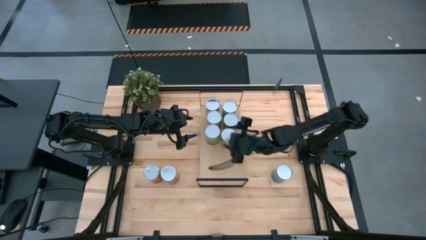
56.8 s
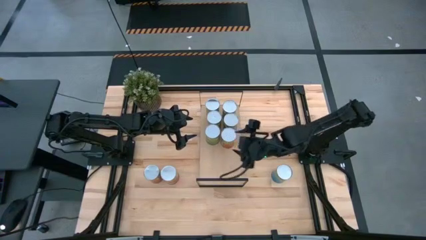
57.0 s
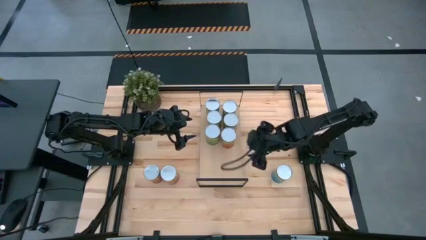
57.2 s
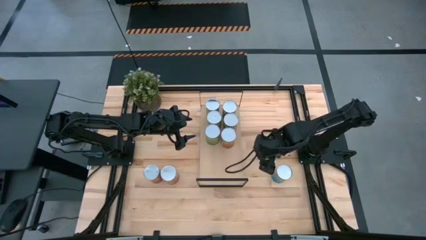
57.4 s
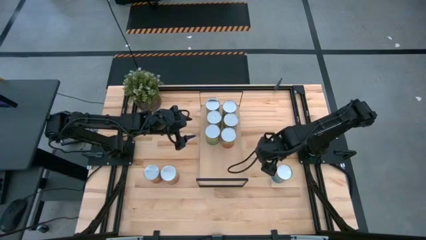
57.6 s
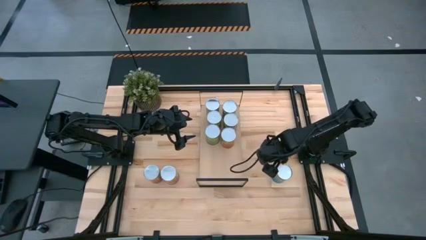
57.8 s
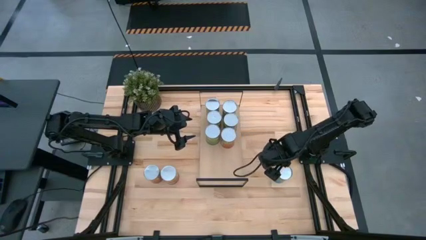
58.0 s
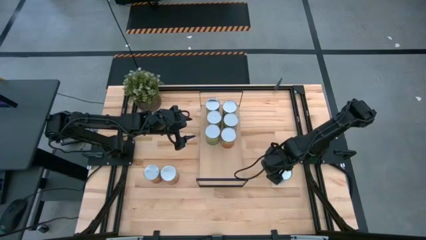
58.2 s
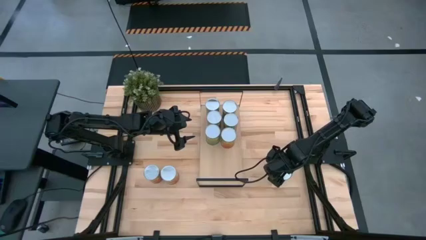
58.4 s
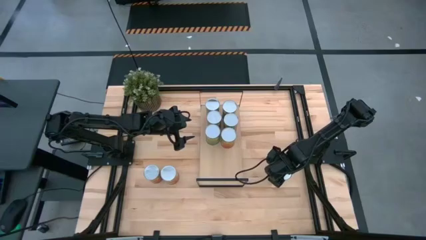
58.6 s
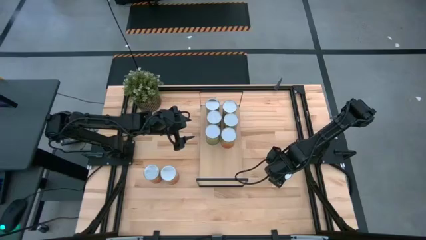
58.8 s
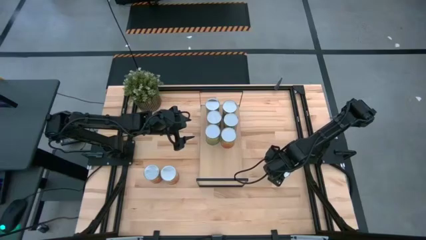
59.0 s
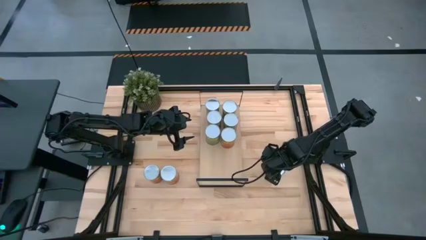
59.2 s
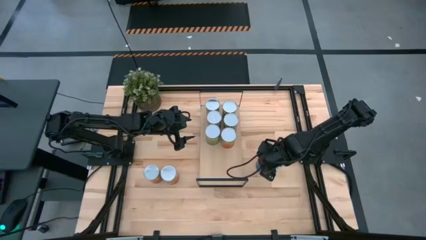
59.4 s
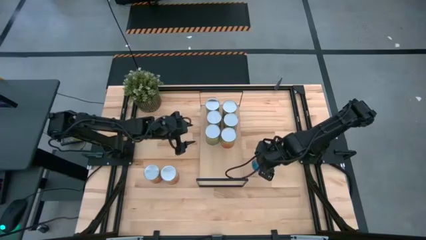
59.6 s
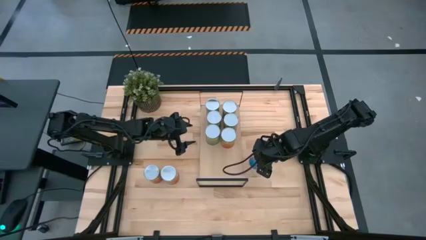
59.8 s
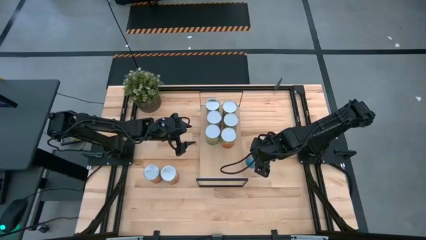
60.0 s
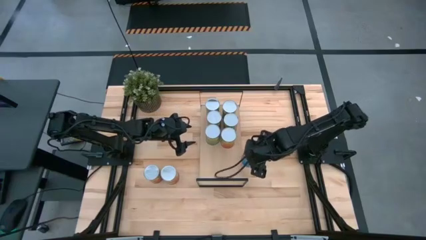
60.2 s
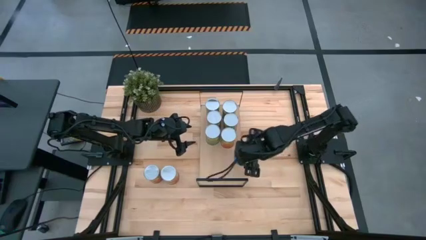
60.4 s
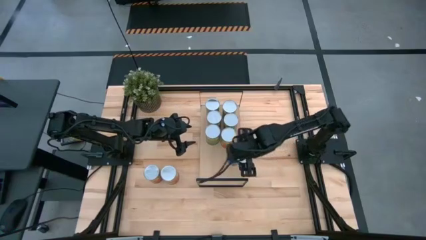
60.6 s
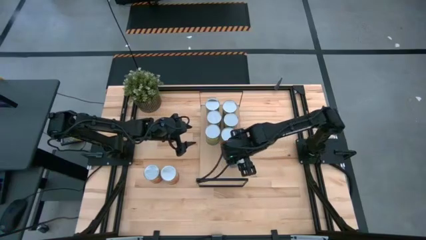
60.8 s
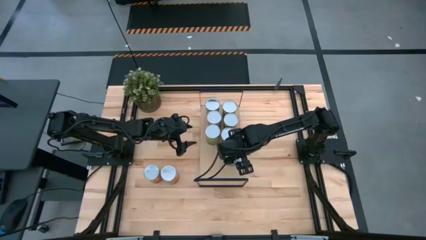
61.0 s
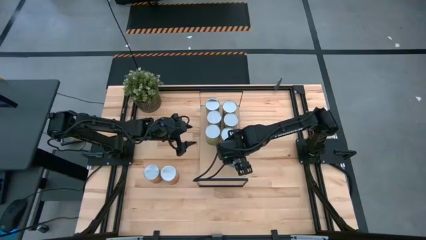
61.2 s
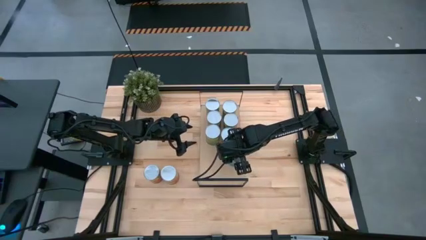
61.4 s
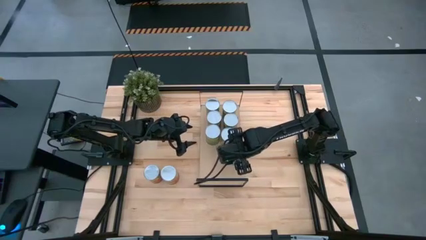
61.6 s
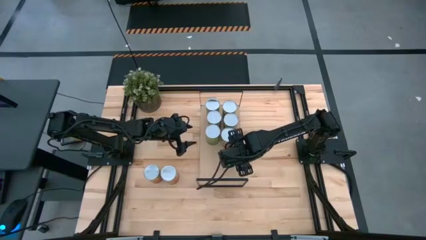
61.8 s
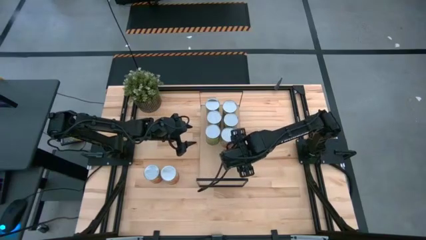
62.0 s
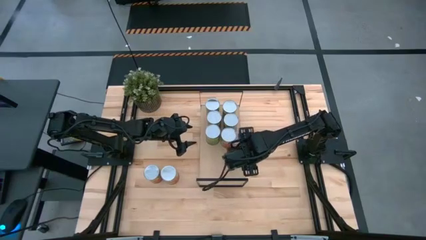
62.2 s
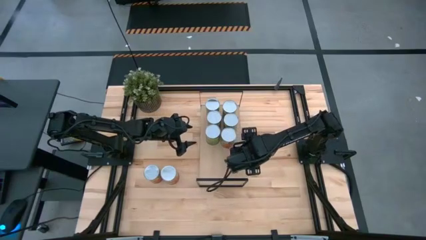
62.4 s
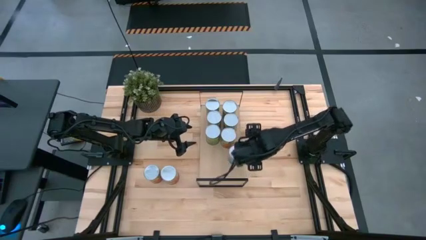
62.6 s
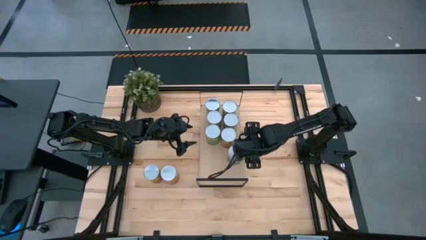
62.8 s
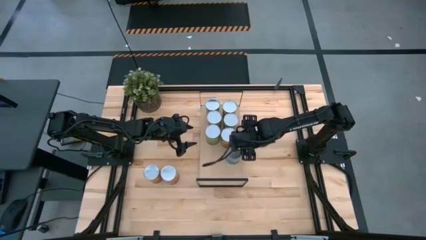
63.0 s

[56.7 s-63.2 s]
Task: Pick and place cans onto a shelf
Put the canned cherries on the shelf

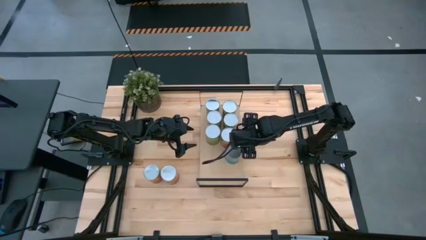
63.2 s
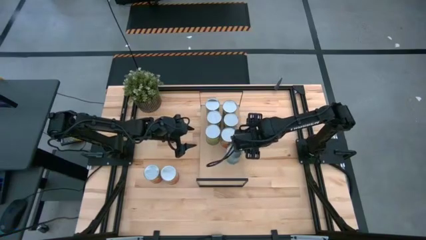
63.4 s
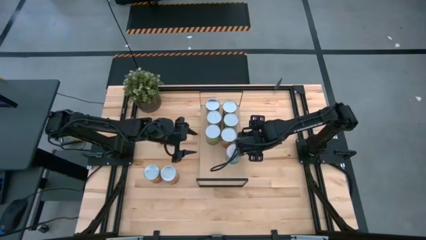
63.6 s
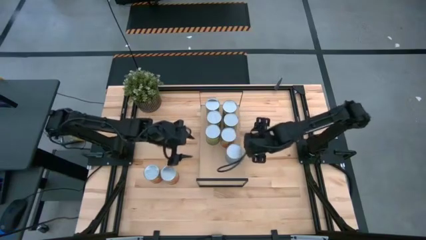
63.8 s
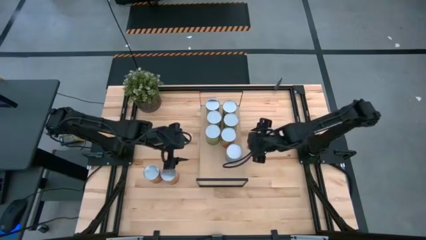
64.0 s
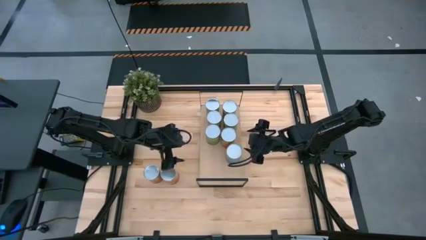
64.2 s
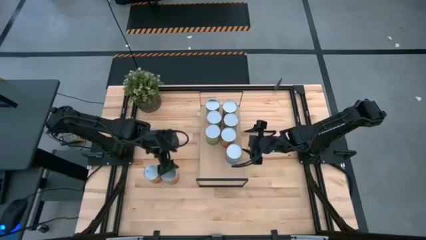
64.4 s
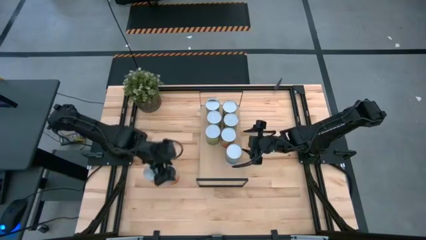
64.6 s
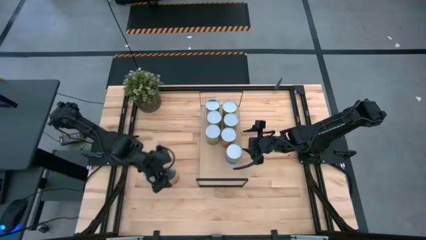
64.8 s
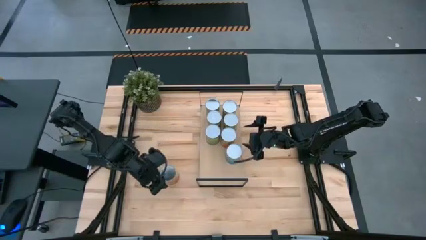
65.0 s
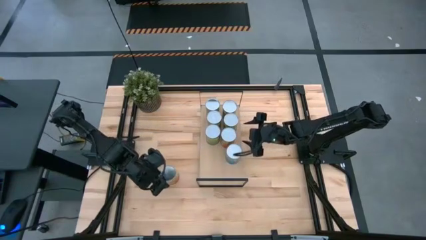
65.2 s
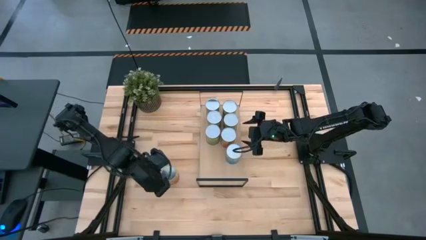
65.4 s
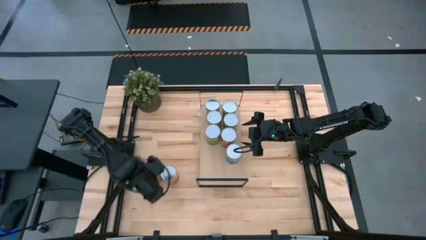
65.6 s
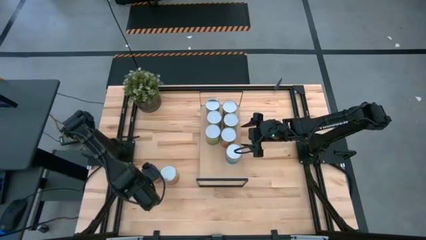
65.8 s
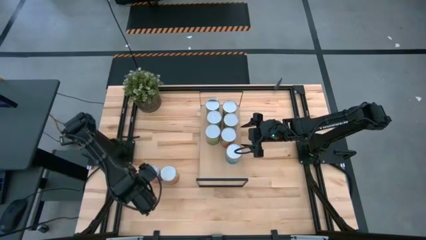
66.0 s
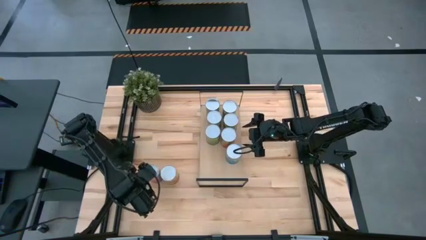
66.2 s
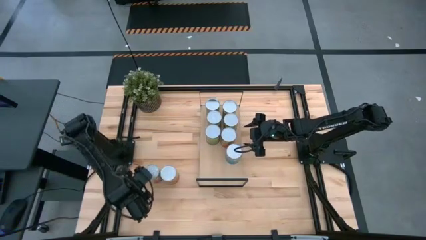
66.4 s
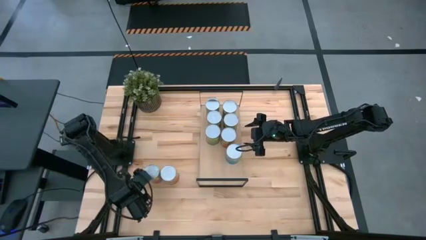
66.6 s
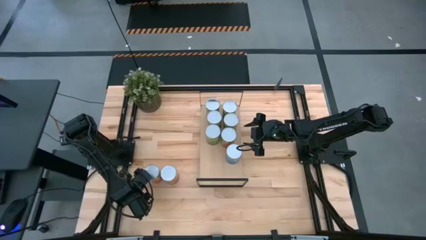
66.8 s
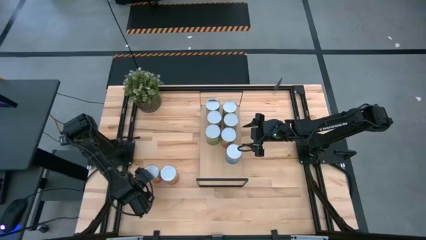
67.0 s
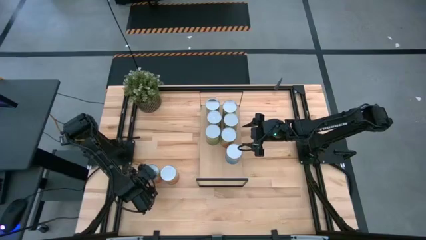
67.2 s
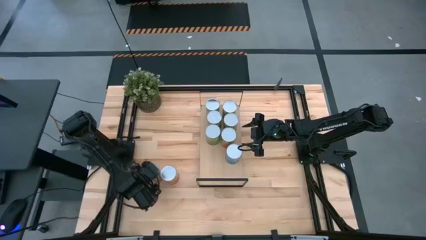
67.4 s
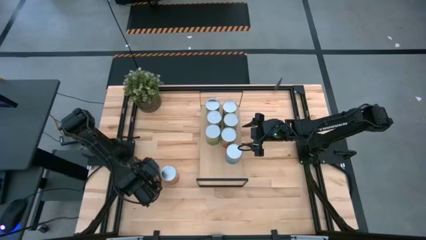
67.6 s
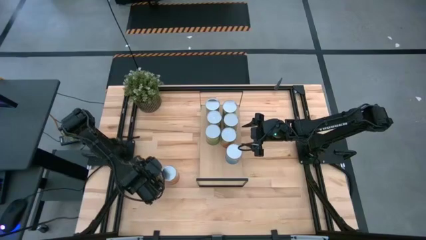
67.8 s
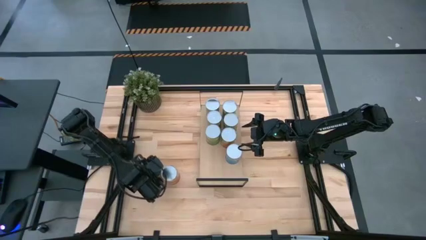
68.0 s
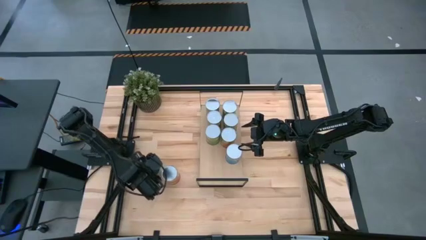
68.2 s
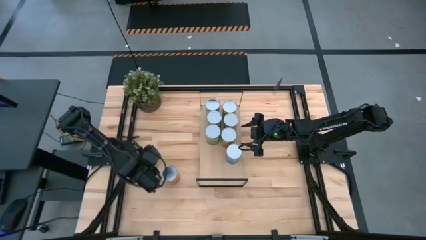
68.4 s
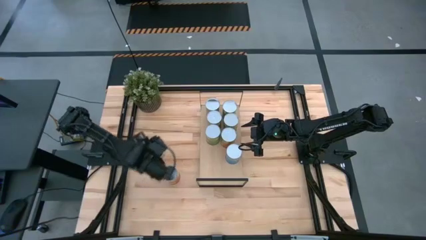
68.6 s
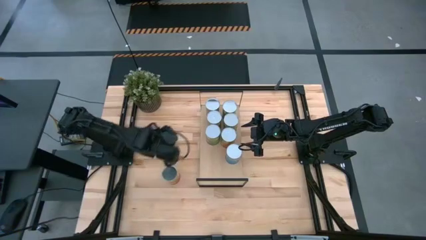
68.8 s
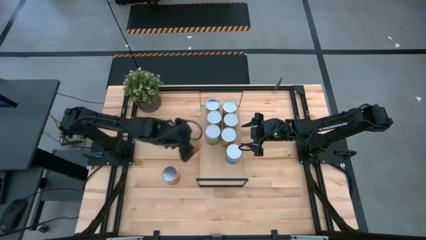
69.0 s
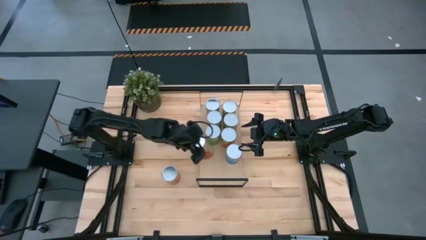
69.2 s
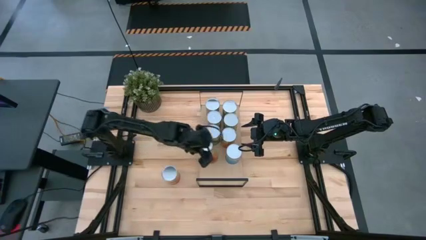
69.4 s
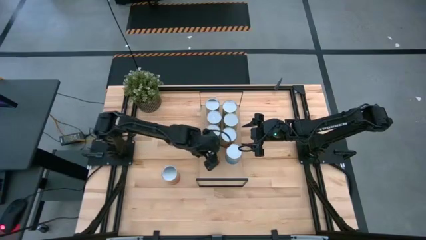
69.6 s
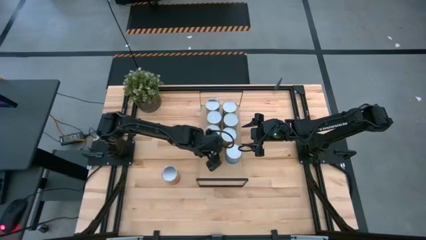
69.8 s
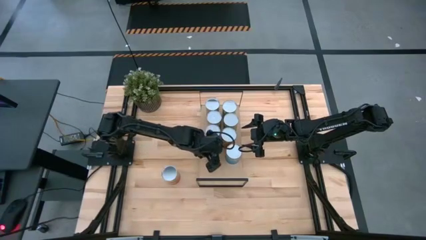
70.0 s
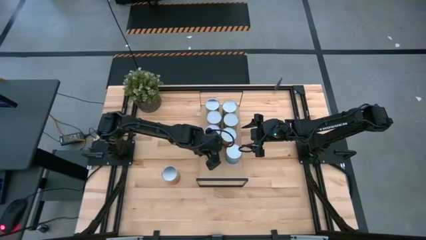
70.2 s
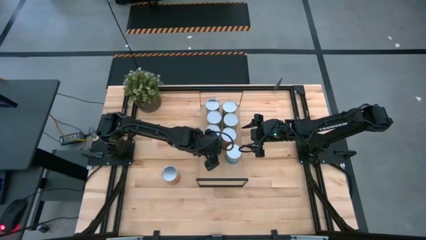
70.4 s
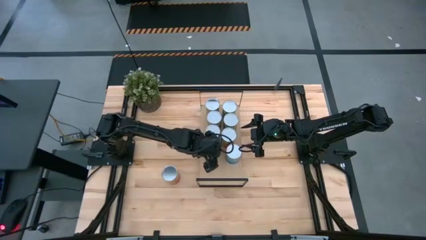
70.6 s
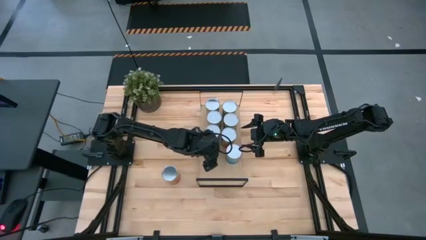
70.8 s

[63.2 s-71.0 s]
Put the canned pineapple on the shelf

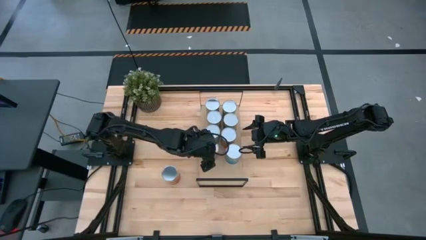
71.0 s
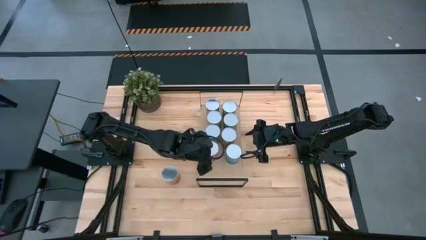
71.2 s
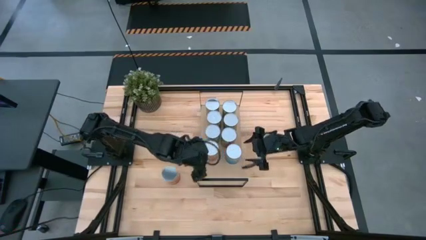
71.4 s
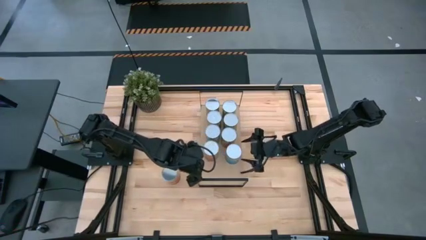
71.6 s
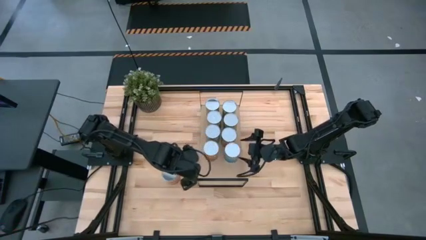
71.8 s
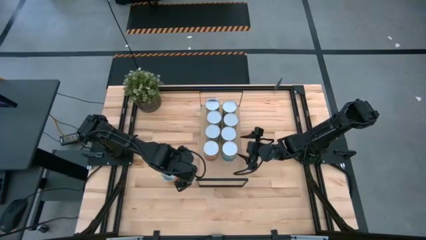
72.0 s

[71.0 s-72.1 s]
Adjust the canned cherries on the shelf

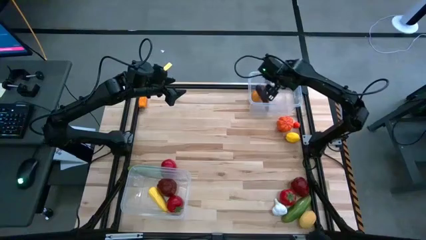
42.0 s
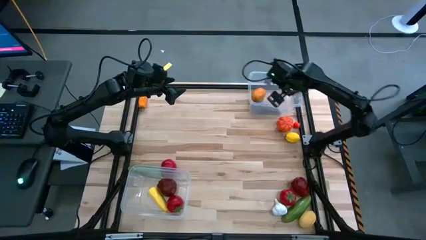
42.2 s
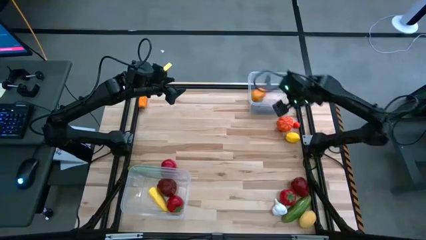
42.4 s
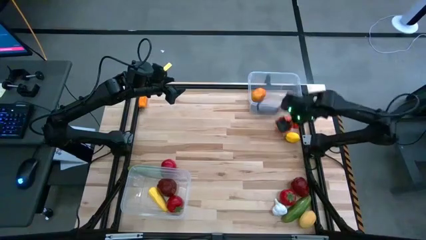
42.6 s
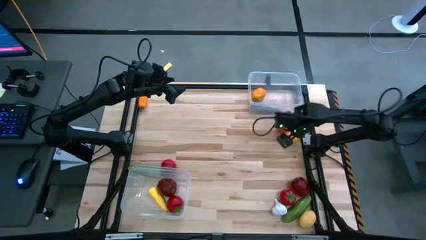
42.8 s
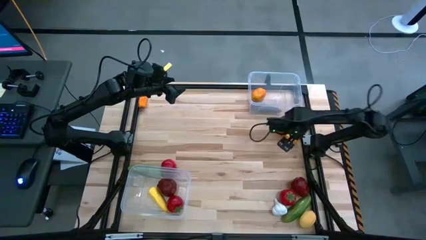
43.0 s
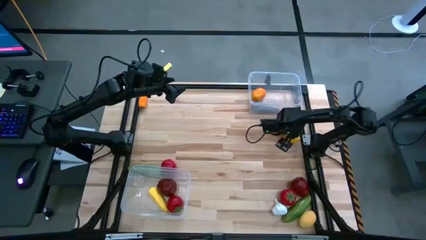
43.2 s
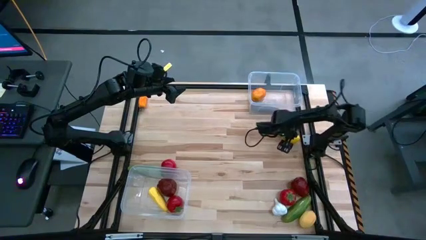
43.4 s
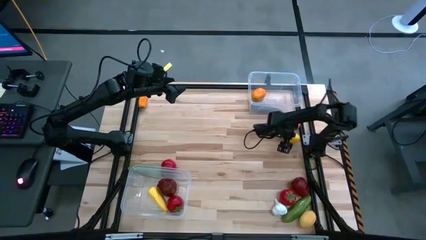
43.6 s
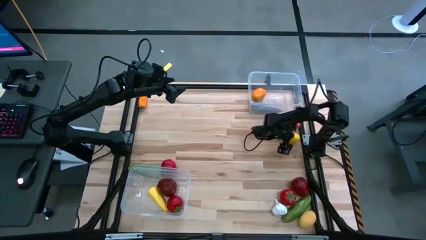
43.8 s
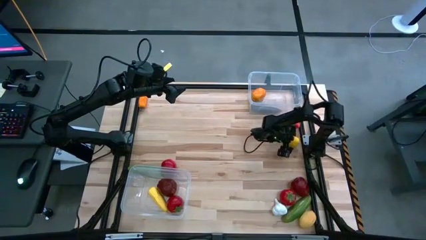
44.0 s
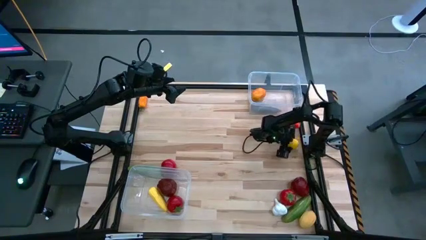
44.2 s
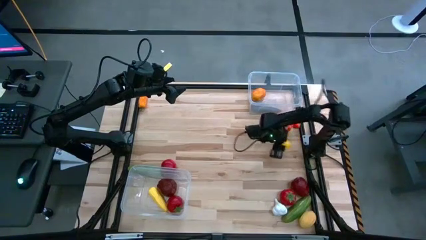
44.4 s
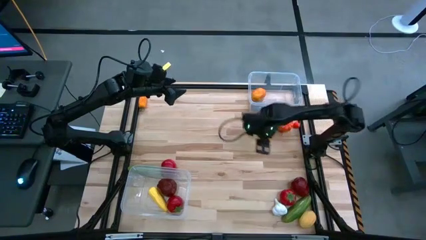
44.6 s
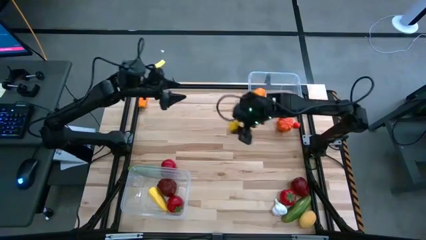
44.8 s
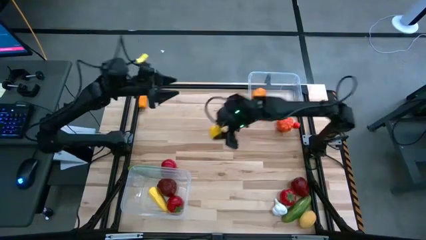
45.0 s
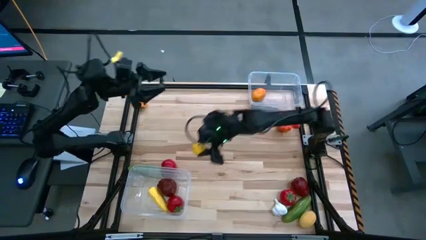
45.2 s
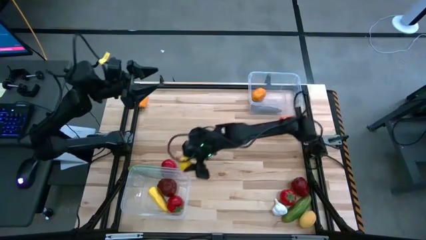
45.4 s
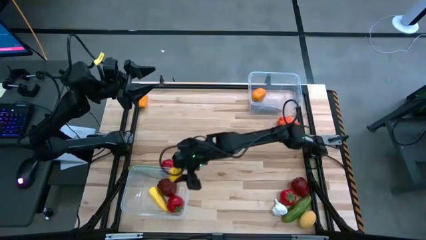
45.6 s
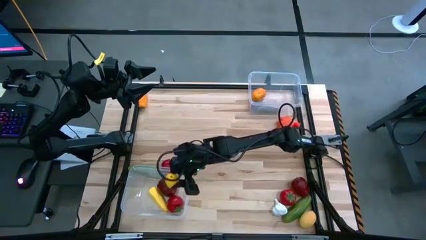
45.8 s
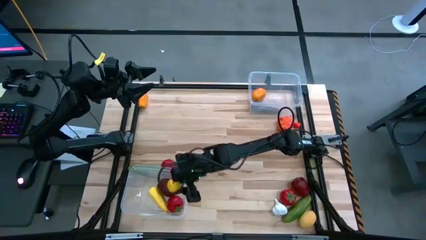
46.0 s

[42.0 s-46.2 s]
Task: Sort produce into baskets
Put the top yellow lemon into the bottom transparent bin
